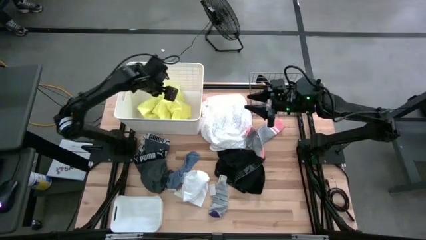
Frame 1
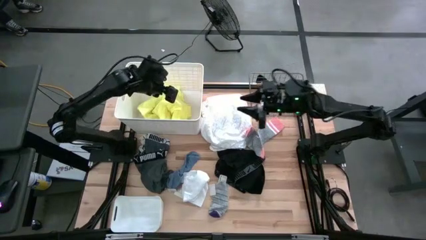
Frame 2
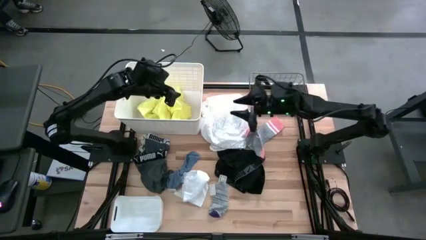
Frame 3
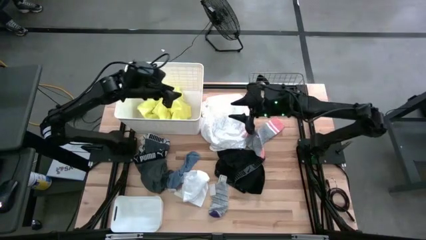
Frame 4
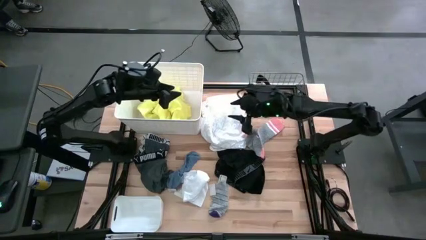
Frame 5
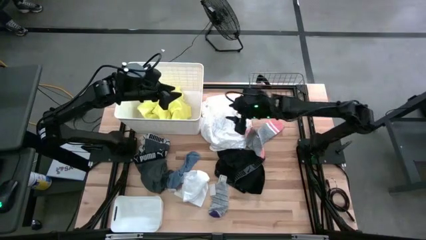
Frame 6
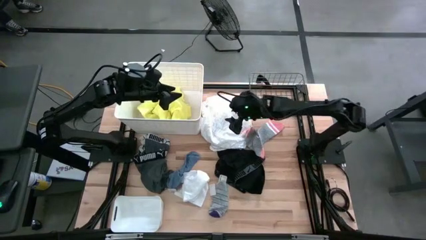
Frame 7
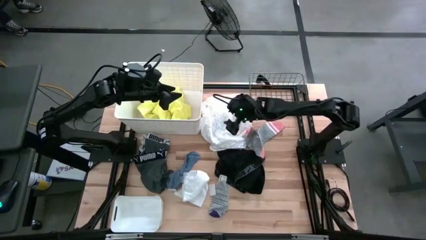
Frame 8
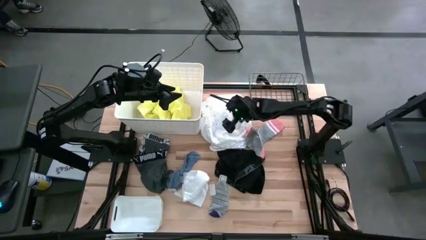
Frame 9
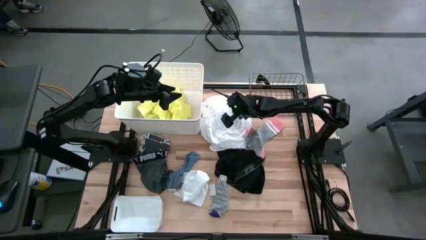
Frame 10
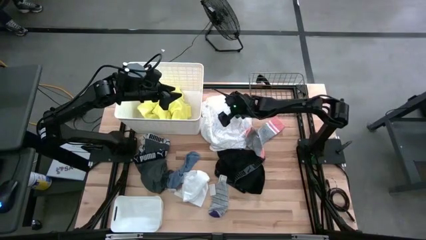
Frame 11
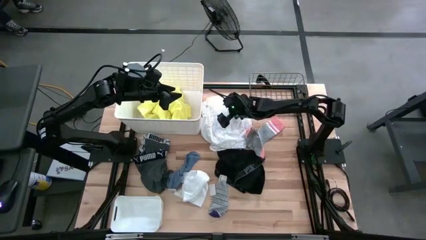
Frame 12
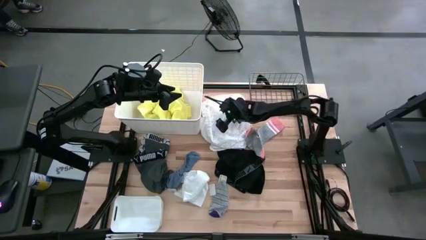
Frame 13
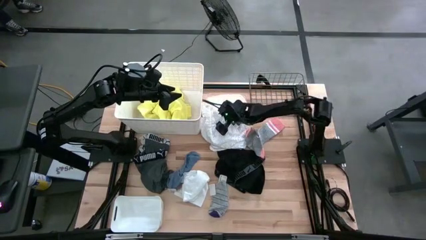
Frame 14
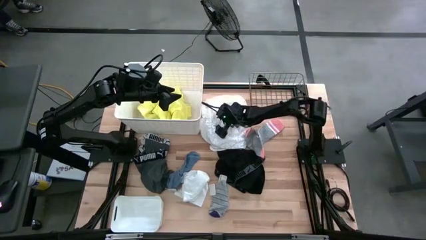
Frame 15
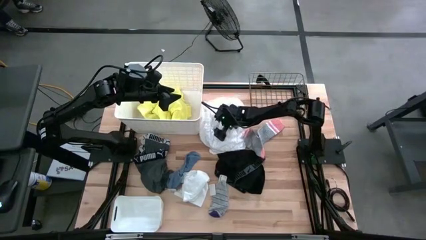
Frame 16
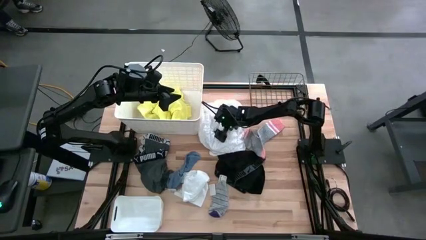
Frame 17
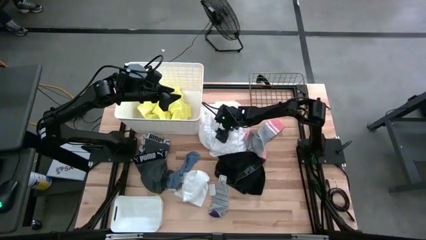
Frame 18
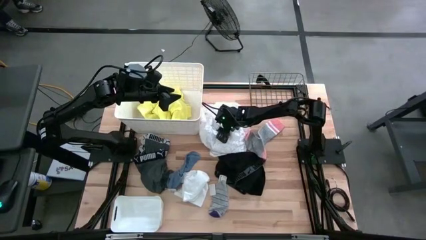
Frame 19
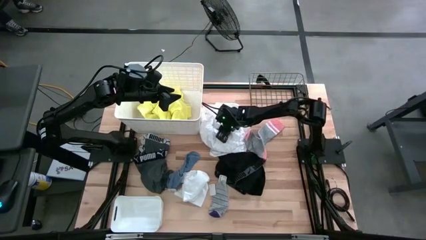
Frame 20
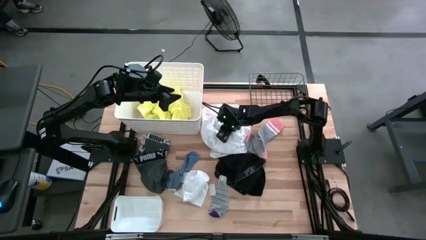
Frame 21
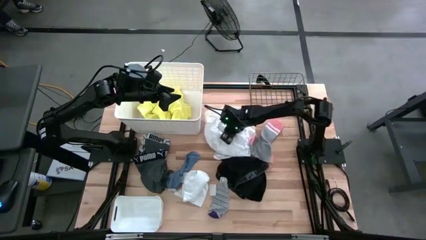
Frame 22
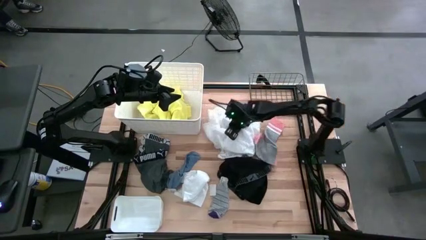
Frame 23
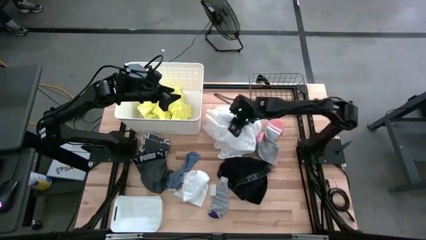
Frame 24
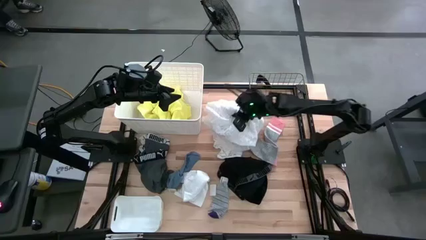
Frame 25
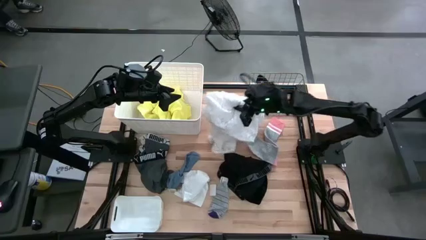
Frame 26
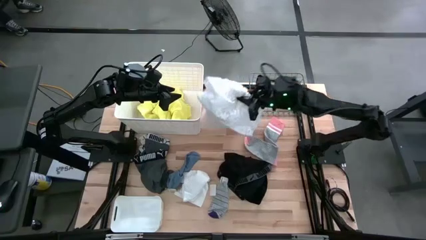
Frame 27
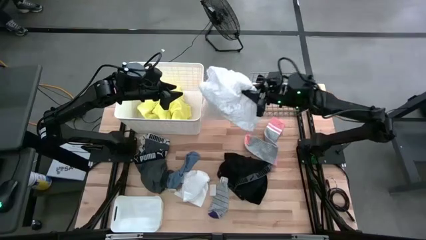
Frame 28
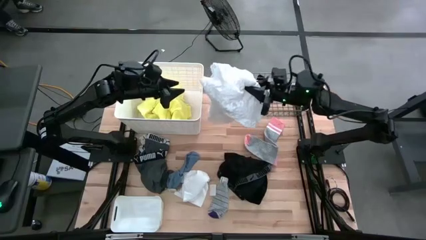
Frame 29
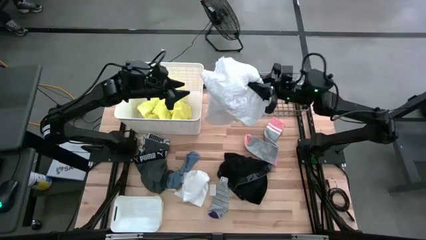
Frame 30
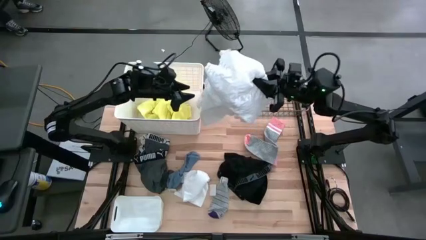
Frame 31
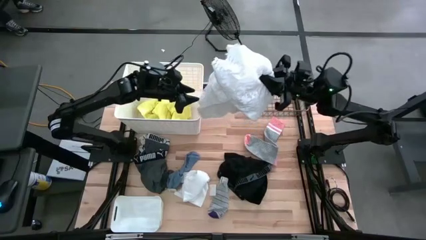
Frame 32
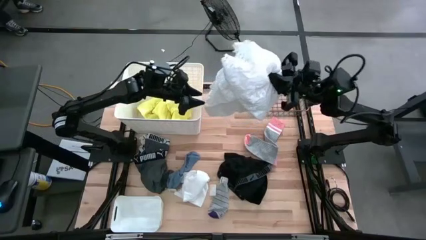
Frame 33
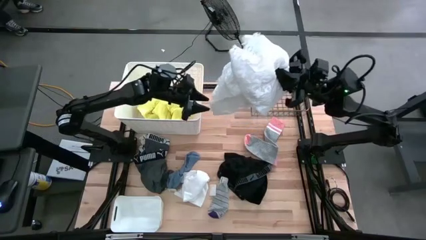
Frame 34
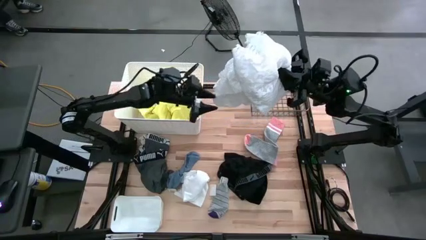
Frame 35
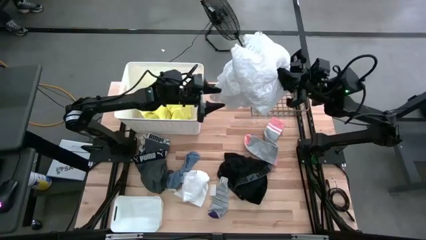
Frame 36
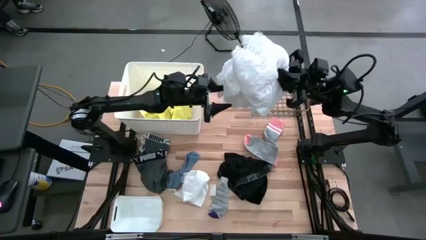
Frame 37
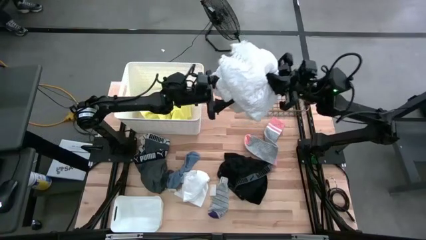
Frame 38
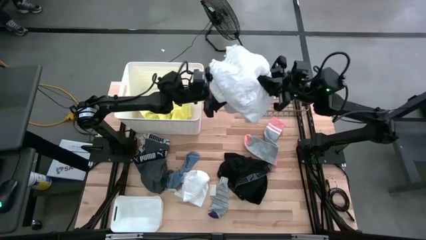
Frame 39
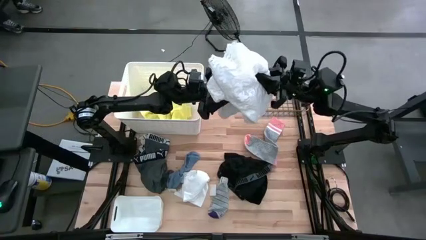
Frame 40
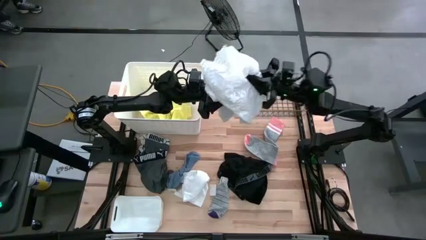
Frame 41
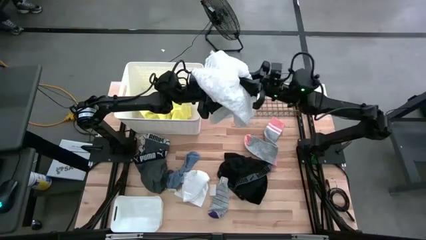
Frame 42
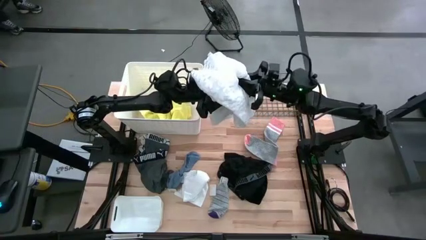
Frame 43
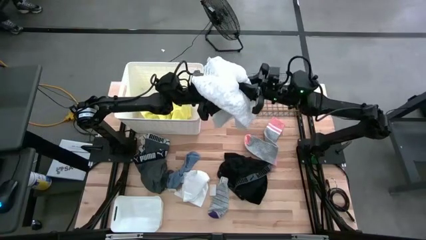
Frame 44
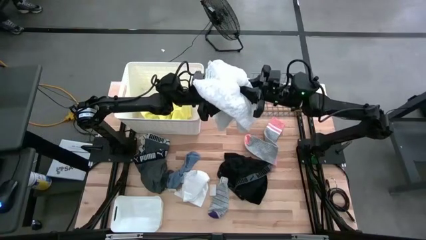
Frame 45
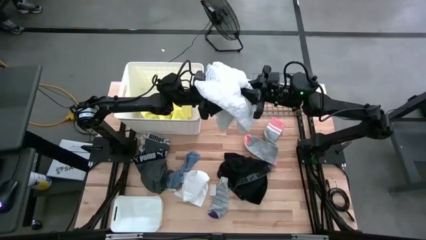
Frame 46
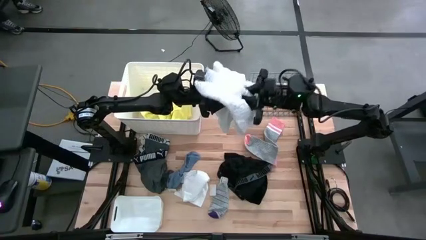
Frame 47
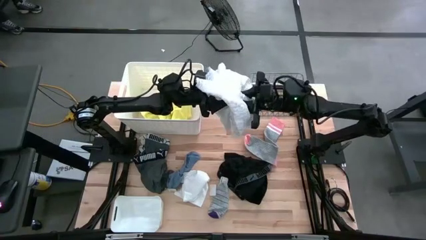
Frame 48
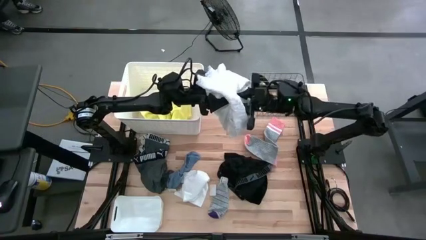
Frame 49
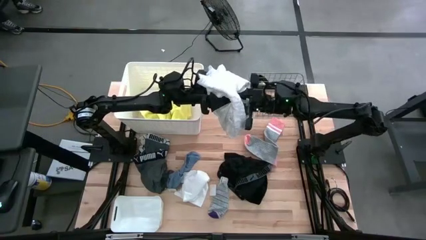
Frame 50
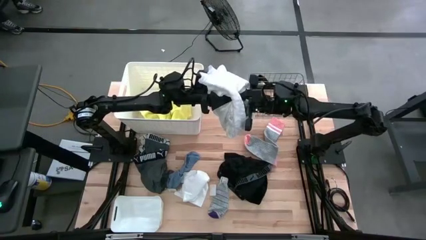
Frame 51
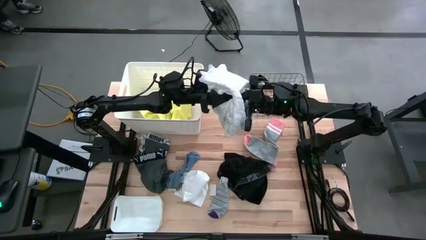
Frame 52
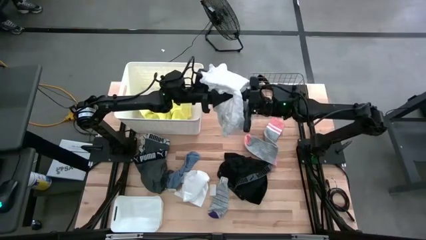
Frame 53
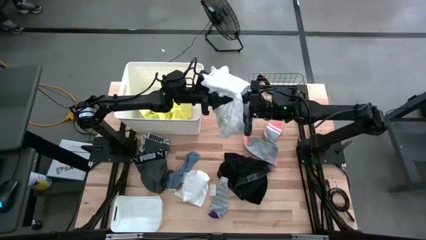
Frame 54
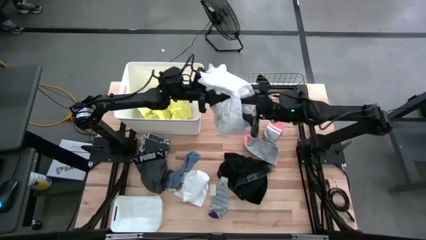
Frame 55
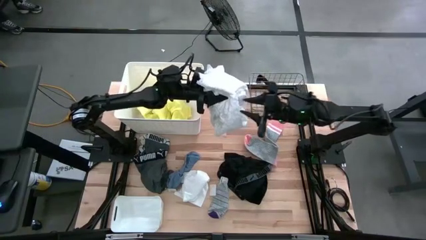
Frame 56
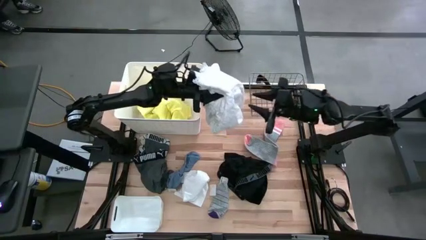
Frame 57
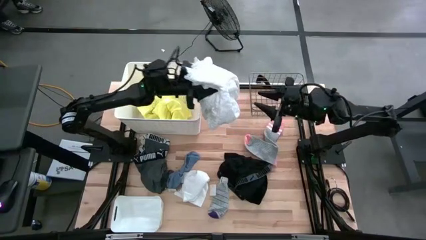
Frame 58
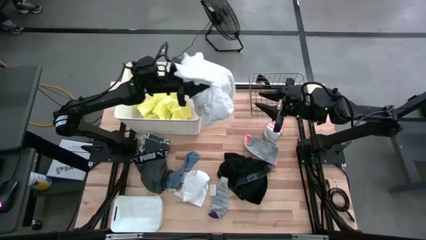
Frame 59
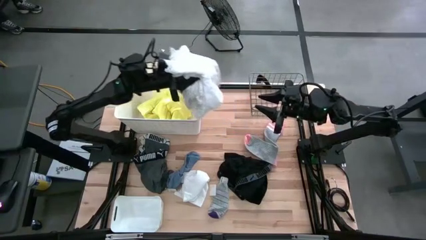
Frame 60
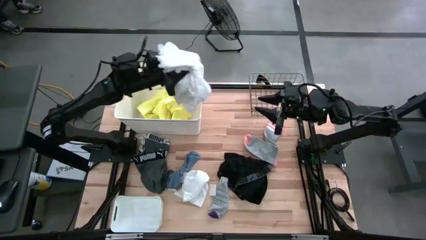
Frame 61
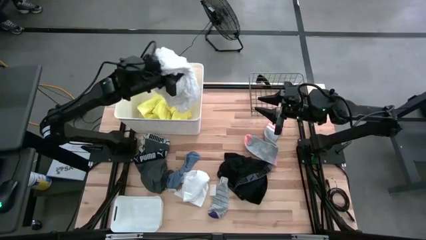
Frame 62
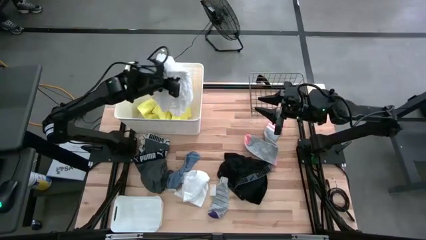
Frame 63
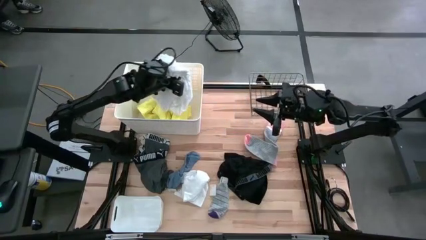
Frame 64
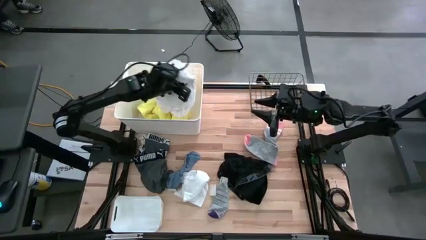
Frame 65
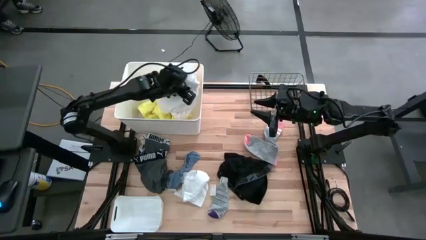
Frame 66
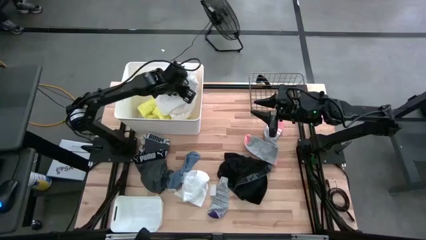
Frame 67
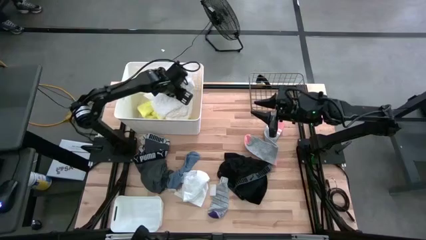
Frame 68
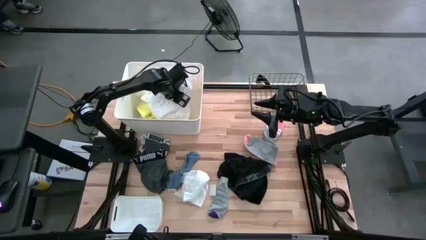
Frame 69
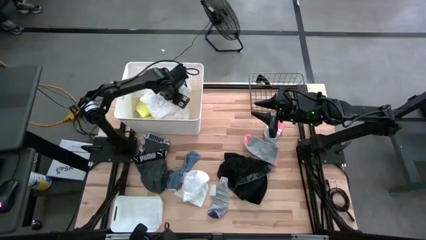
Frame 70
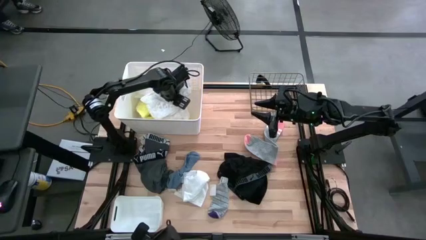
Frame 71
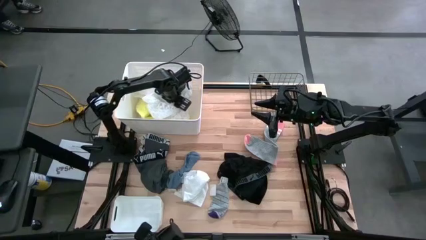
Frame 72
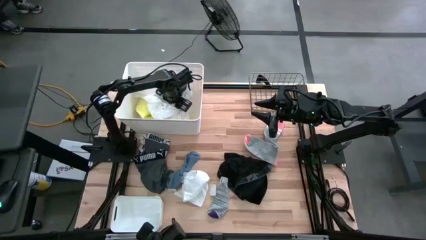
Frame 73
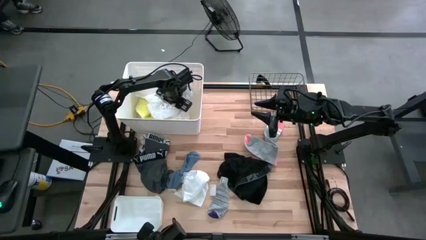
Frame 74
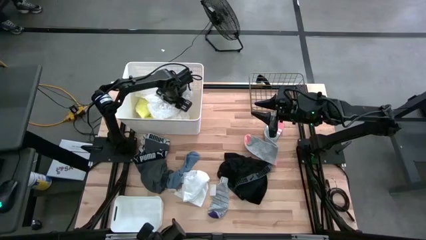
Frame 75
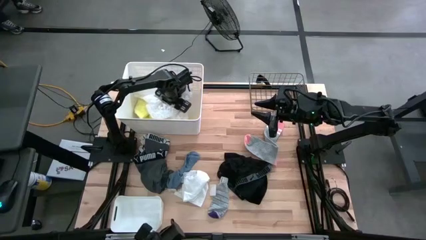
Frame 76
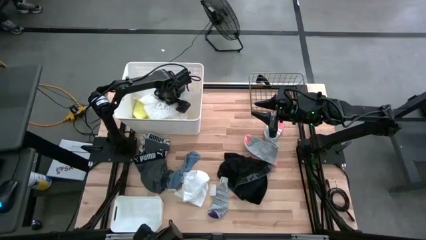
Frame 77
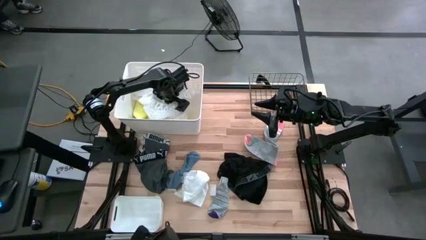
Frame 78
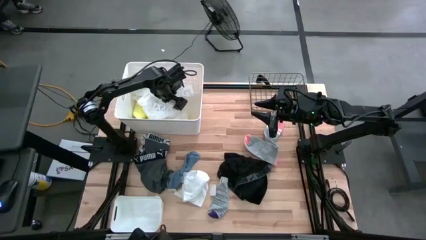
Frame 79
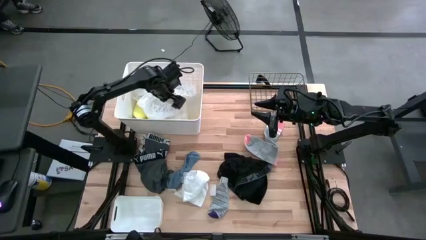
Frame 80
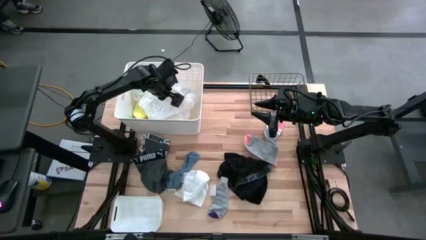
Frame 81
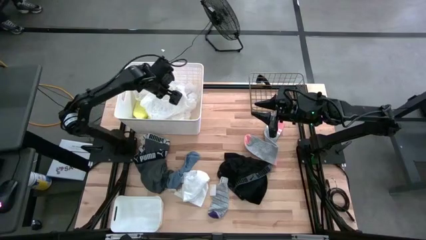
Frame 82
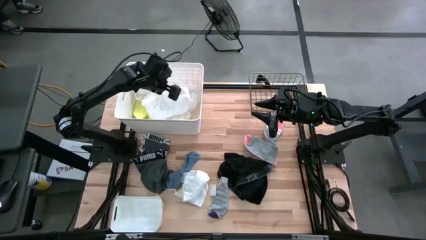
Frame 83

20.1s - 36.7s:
Task: Pick & Place Cloths
Put the white shirt into the top white bin

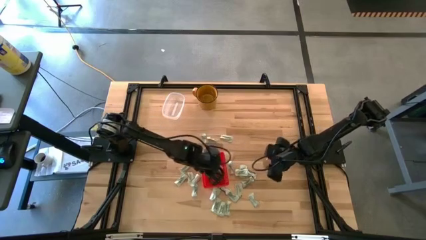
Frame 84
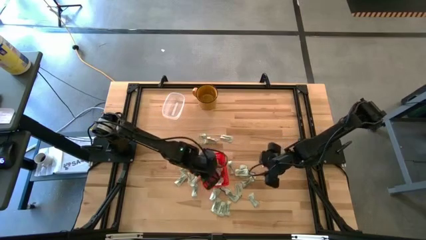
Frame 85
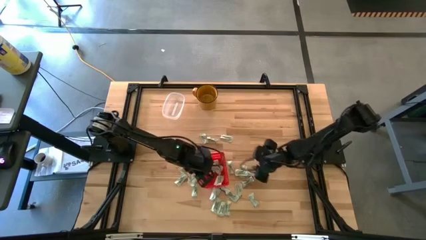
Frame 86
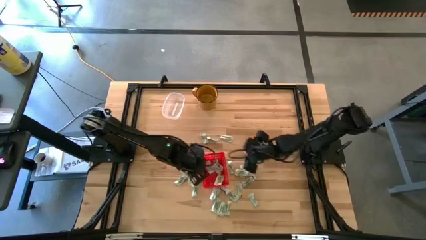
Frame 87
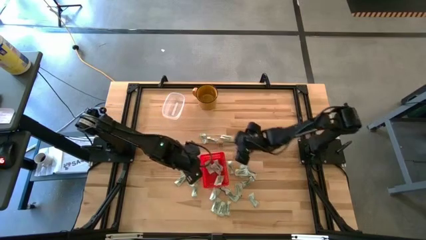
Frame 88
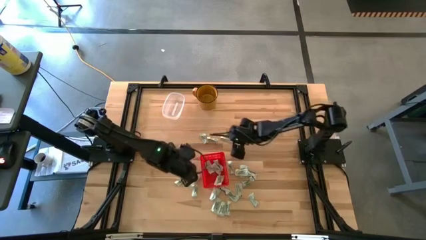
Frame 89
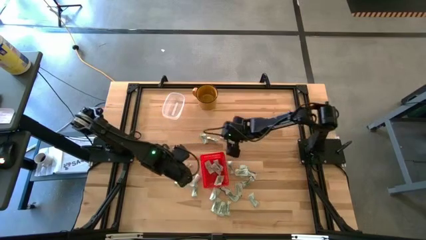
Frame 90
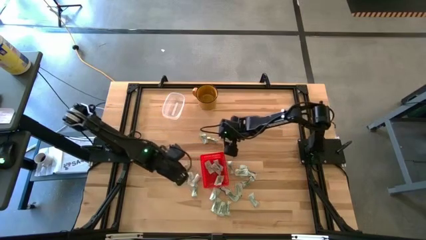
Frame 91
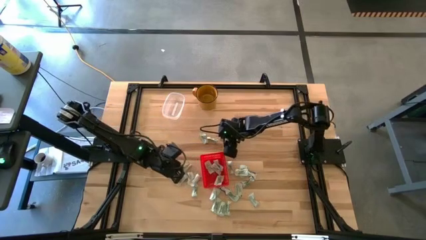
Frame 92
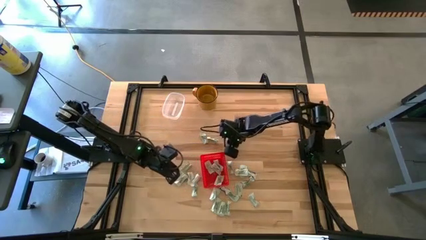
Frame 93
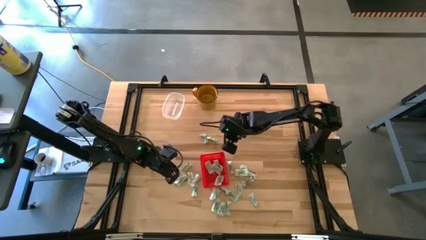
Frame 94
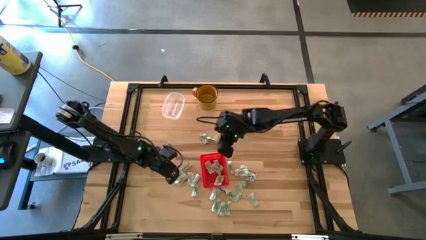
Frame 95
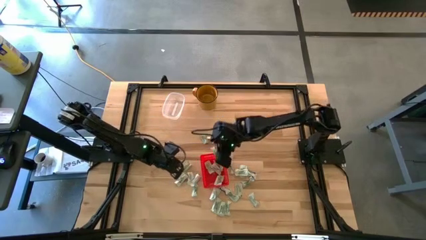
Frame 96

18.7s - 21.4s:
Task: Pick and place Stevia / Truvia into bins
Put the white stevia packet into the red basket
